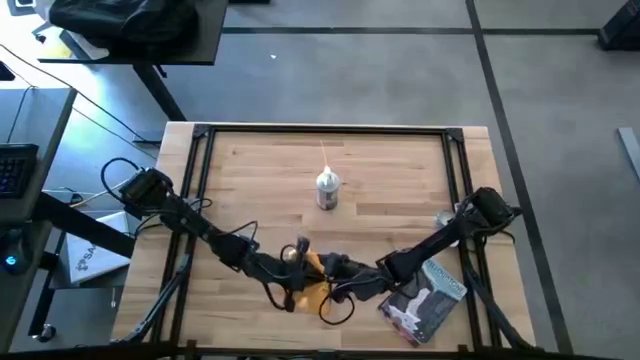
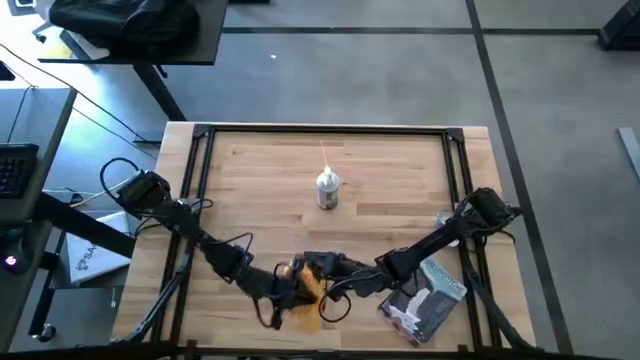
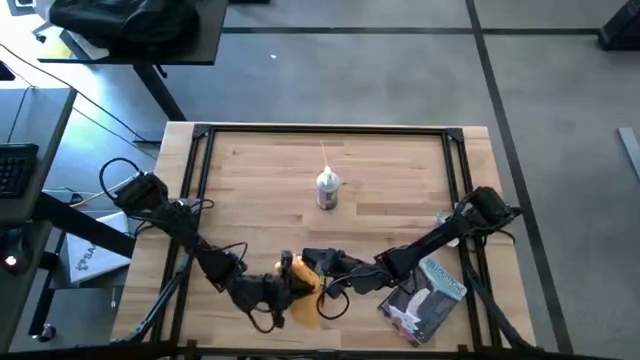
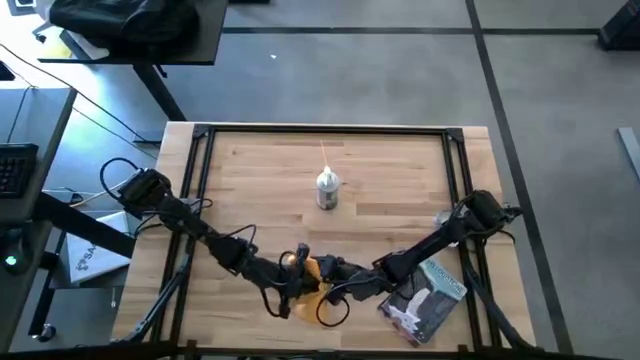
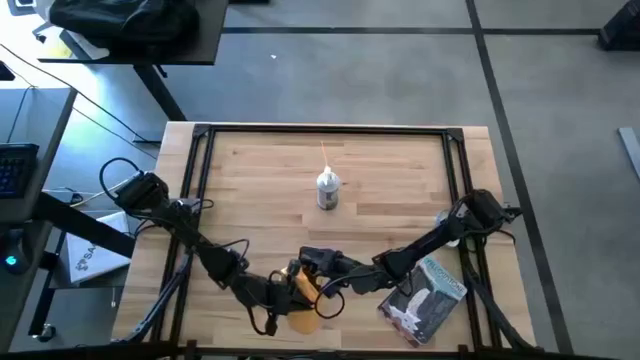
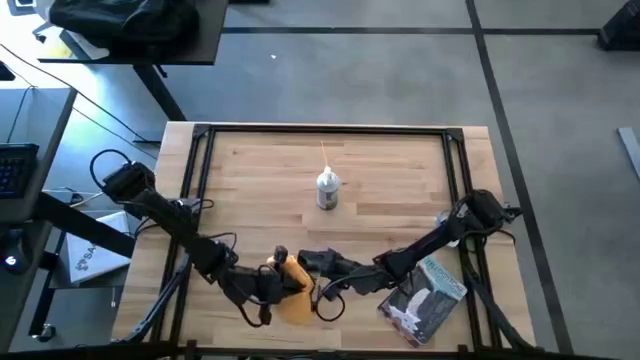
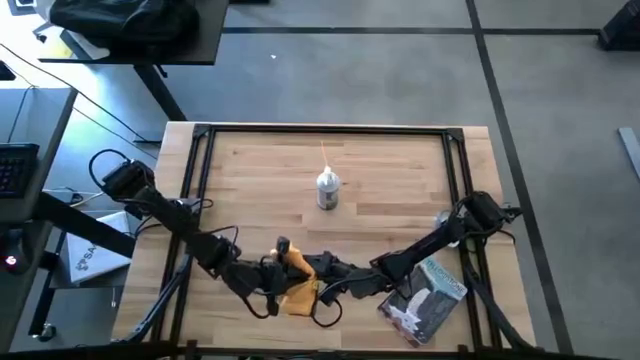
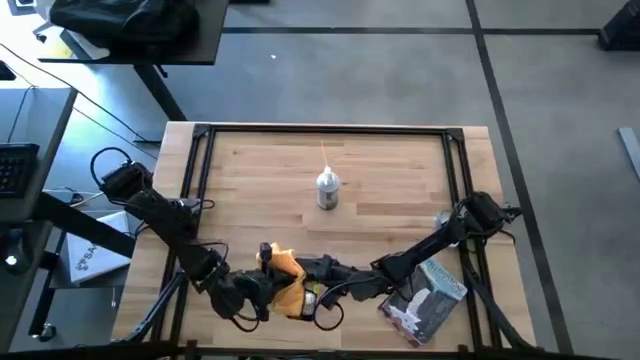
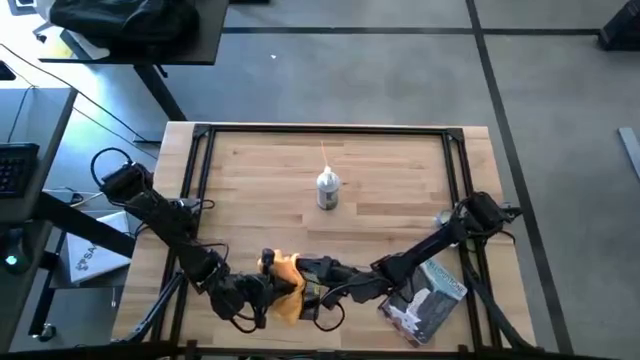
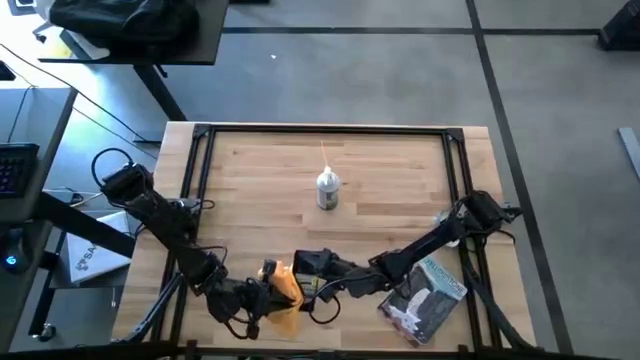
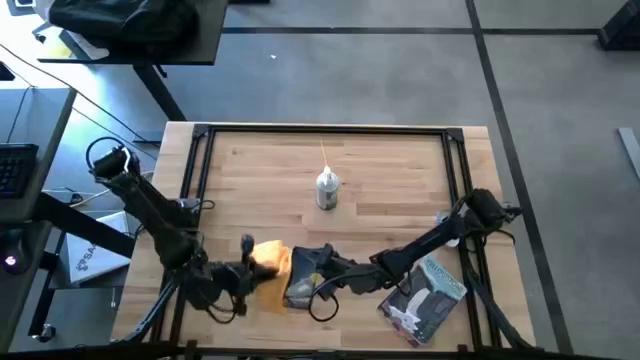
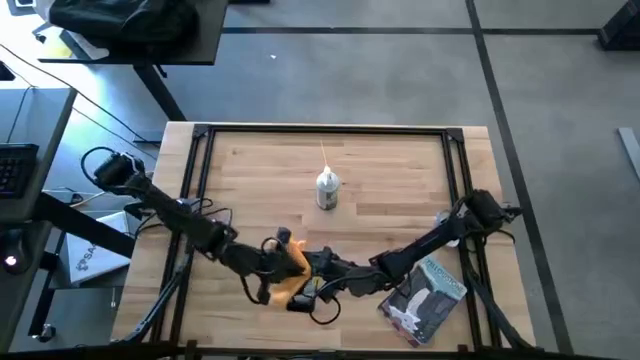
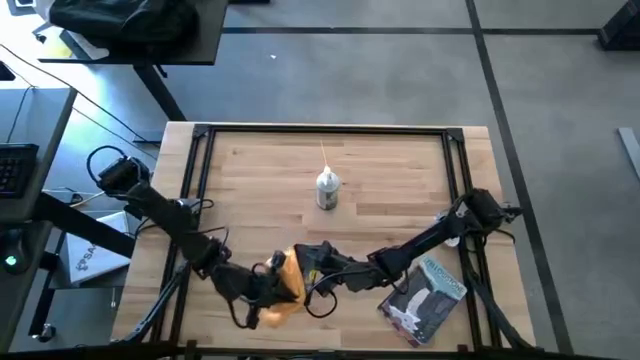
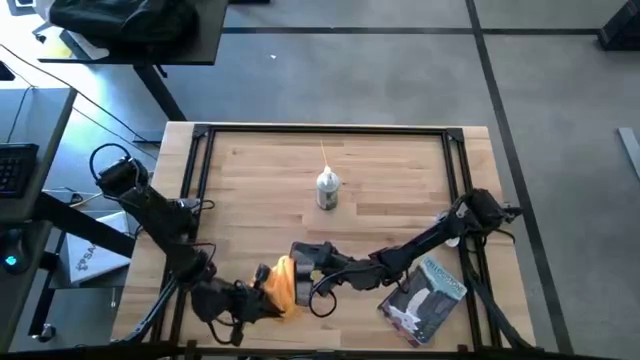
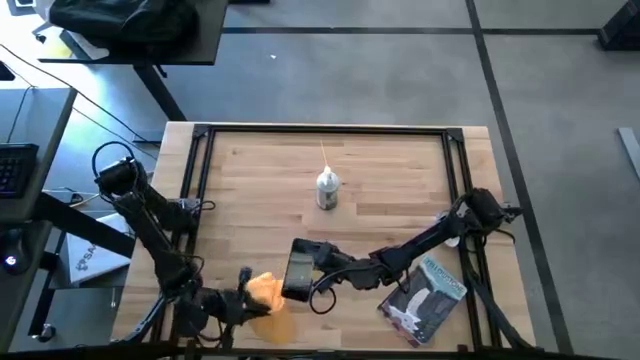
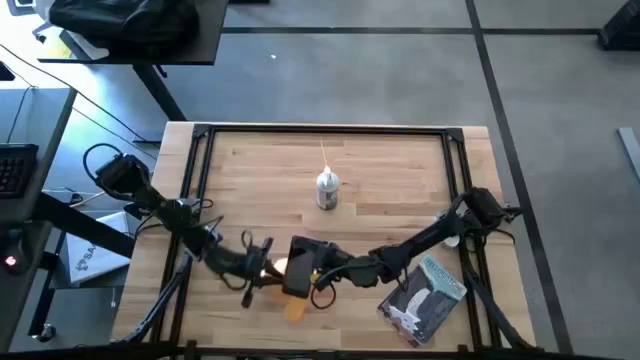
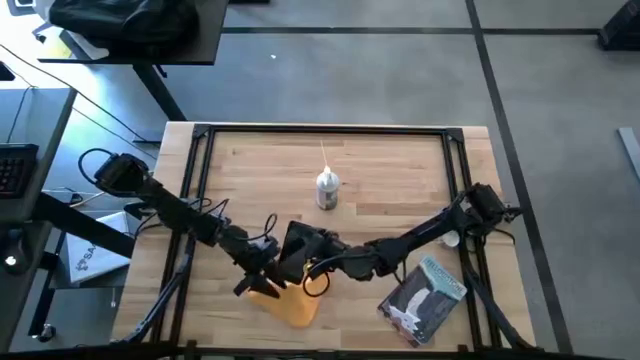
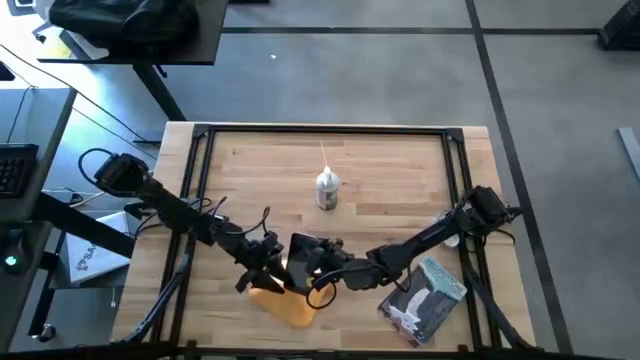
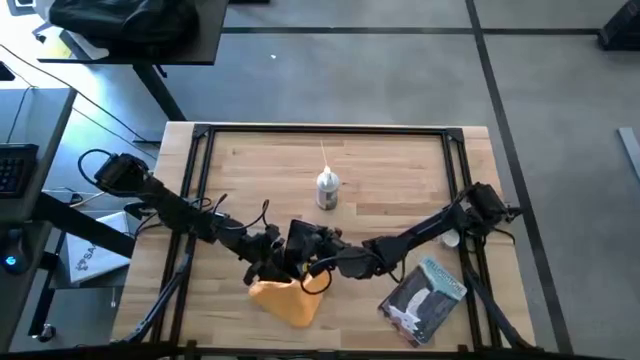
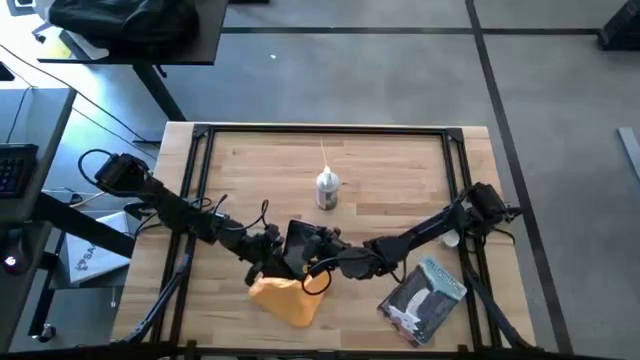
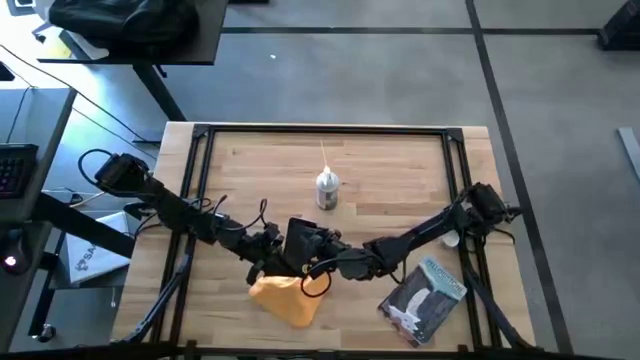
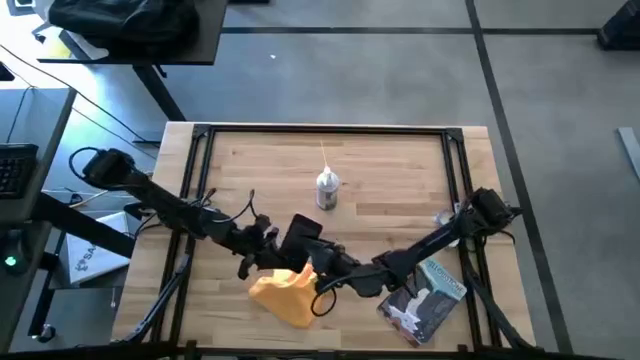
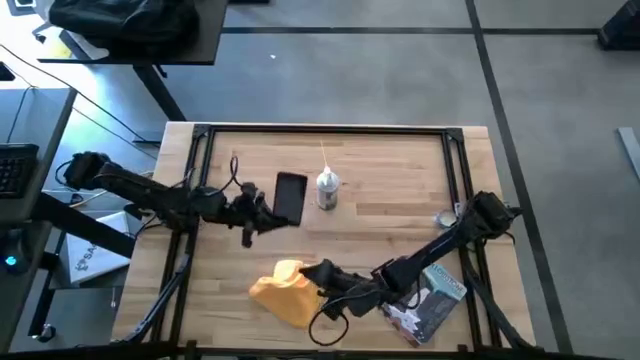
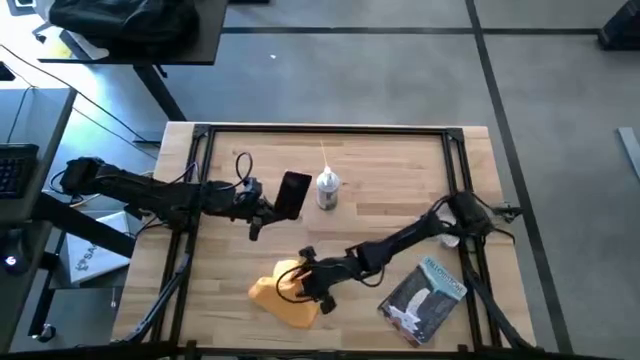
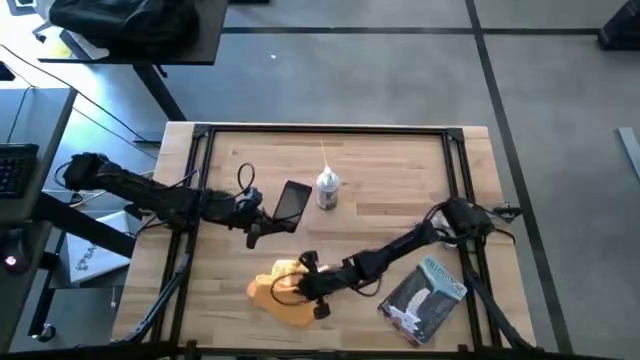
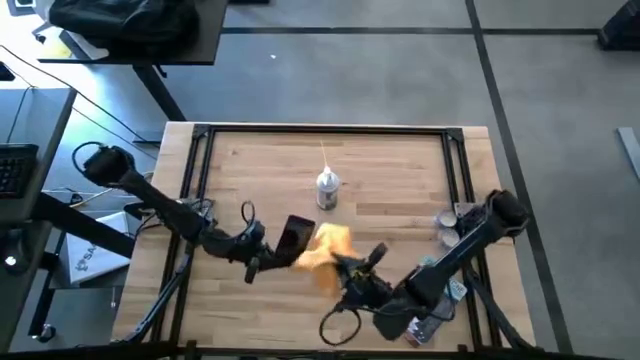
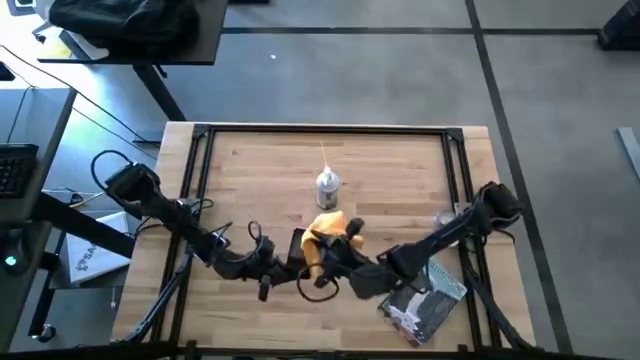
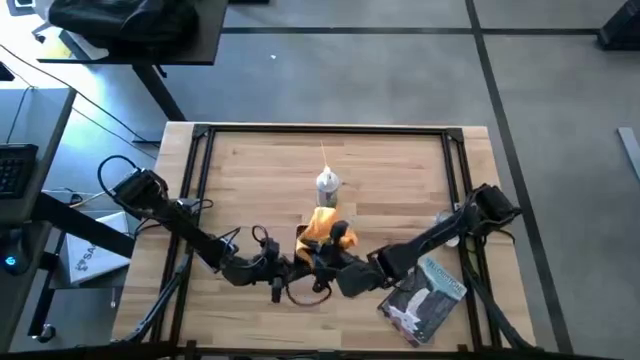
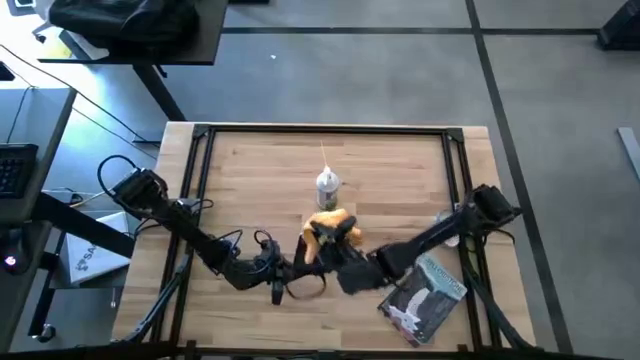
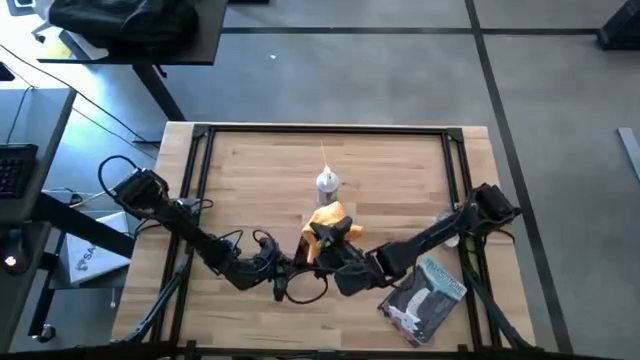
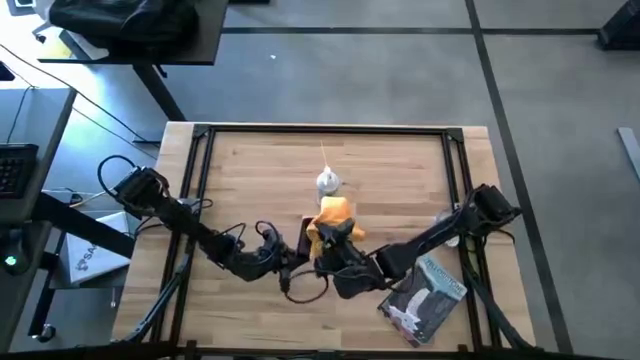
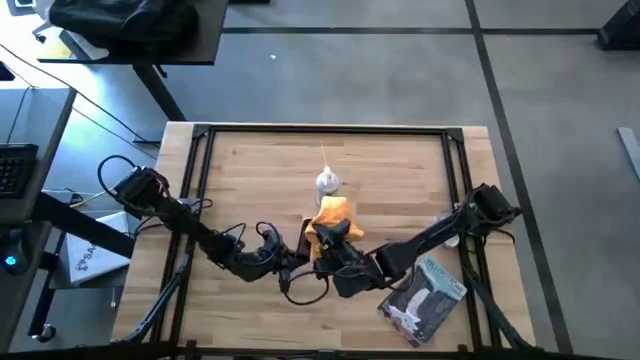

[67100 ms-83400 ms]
Task: Apply microfiber cloth
Wipe the phone with the microfiber towel

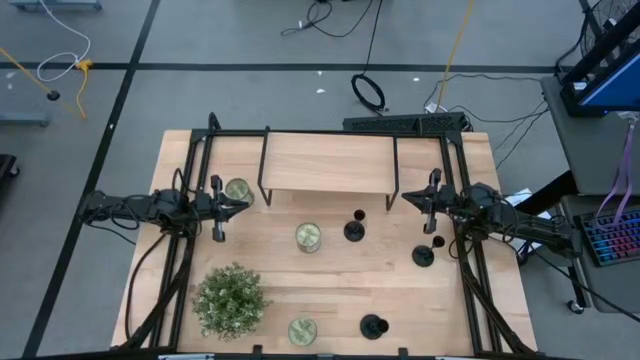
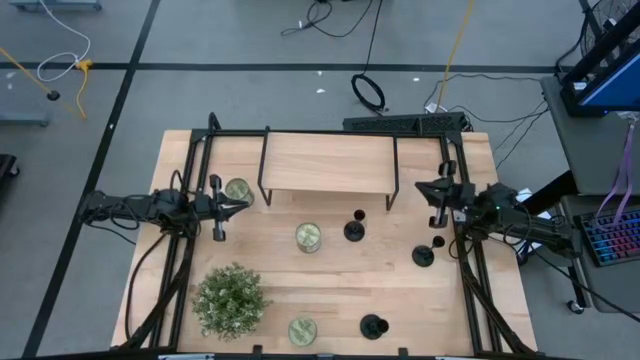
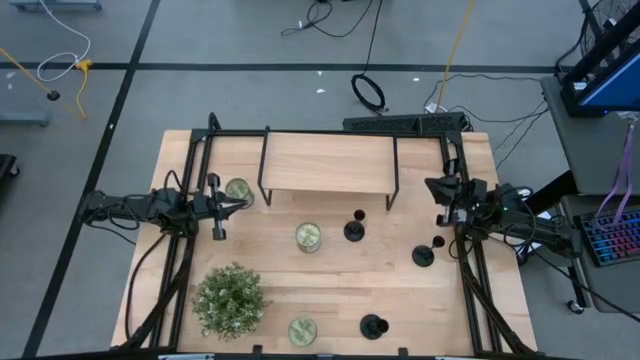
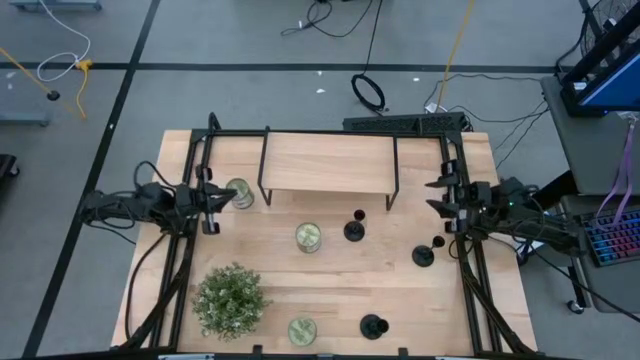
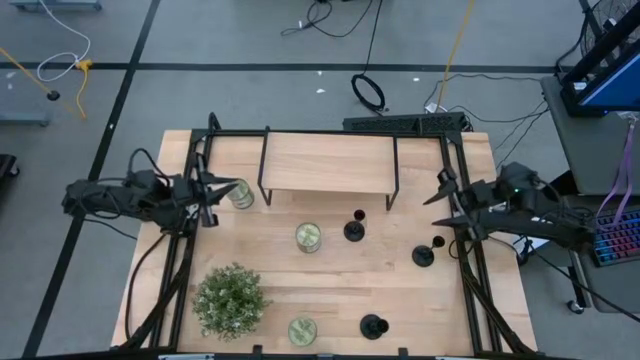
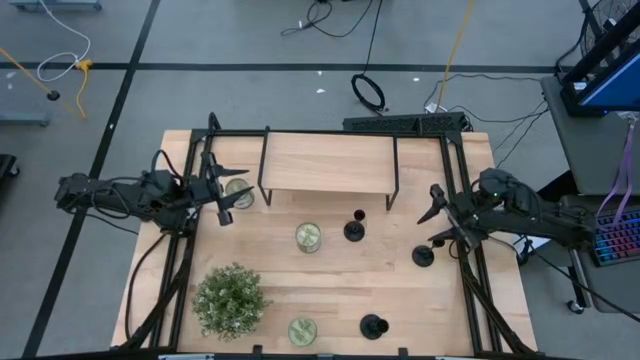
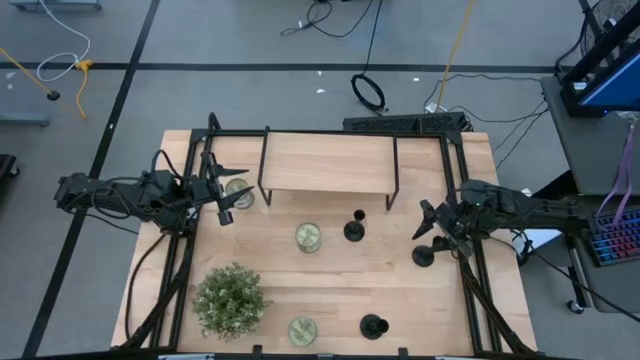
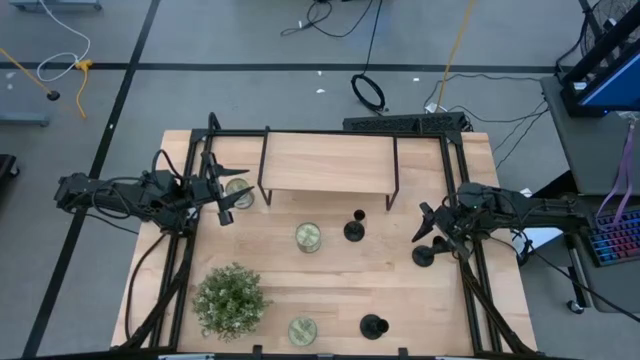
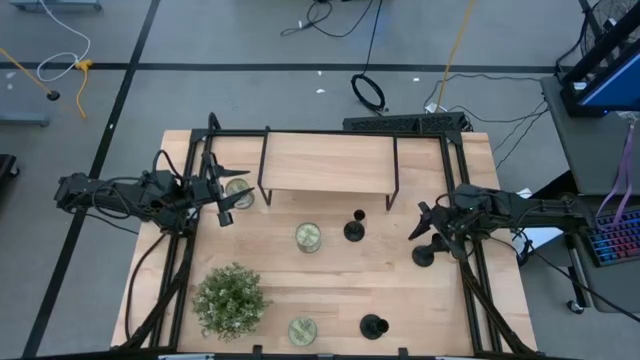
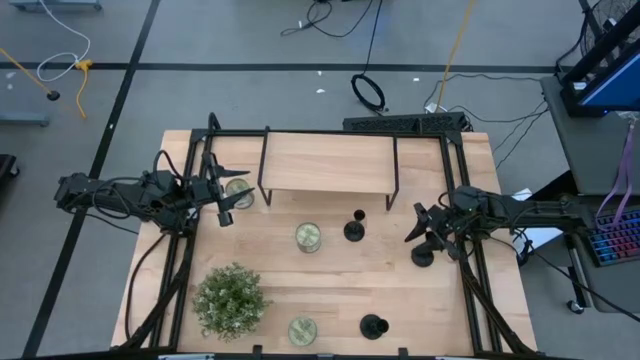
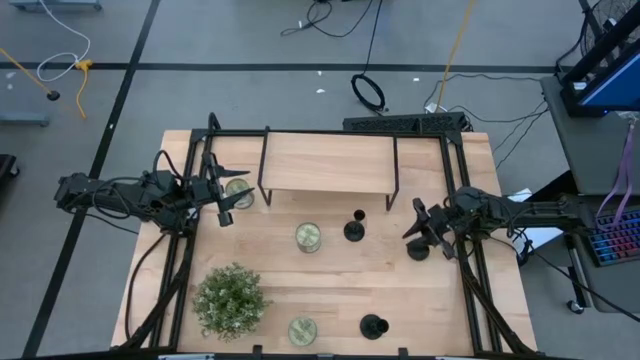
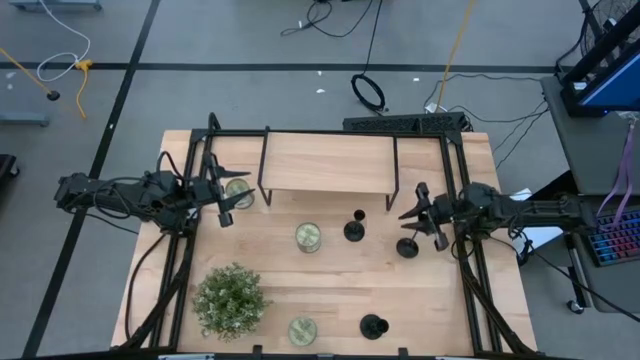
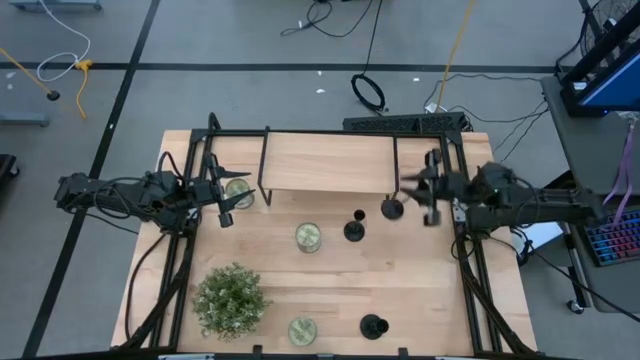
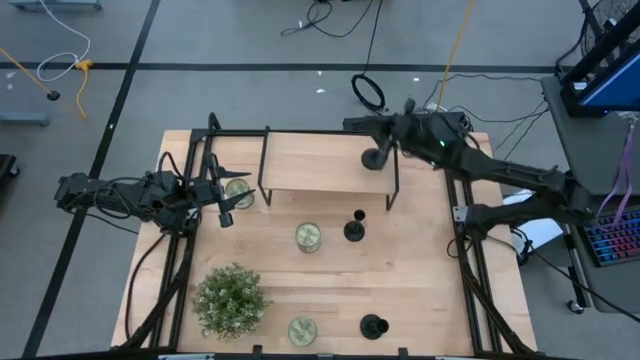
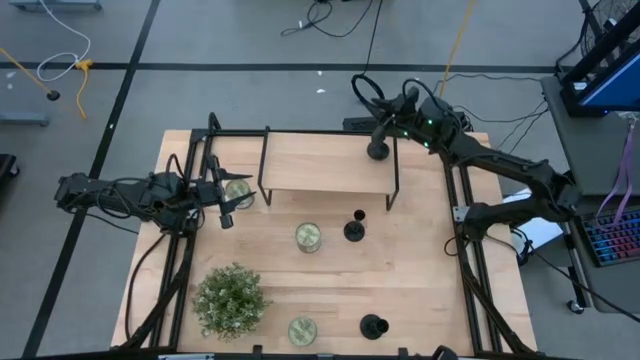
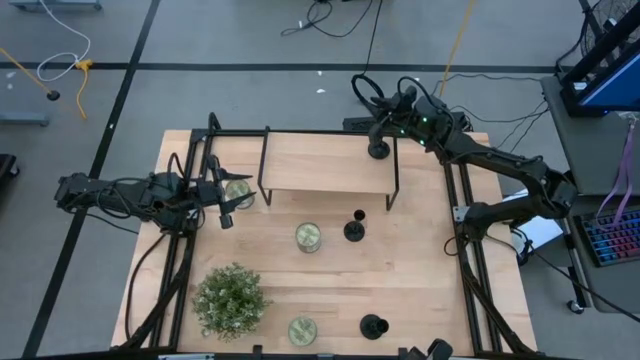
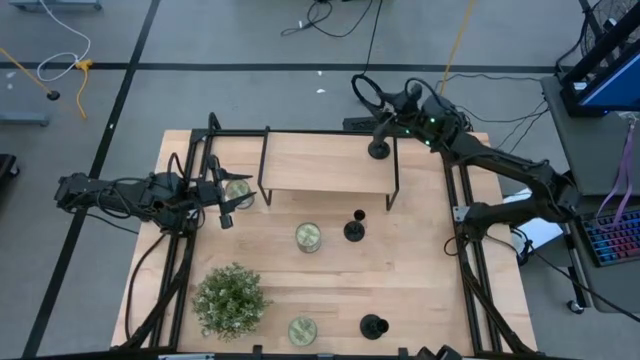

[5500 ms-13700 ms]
Task: Pick & Place candle stick holders
Put the right black candle holder on the shelf
